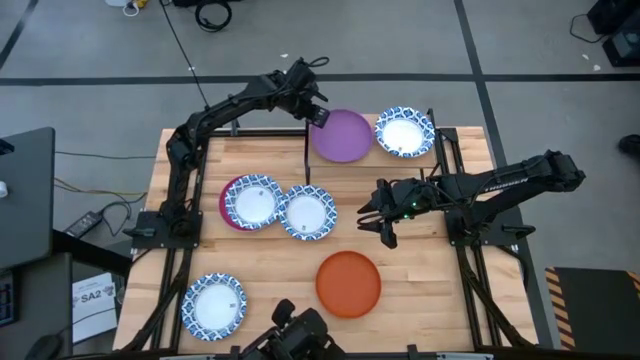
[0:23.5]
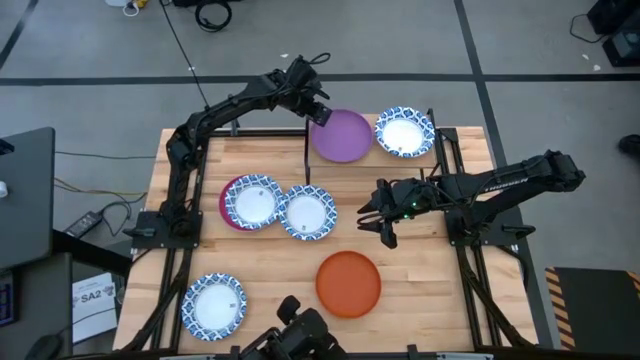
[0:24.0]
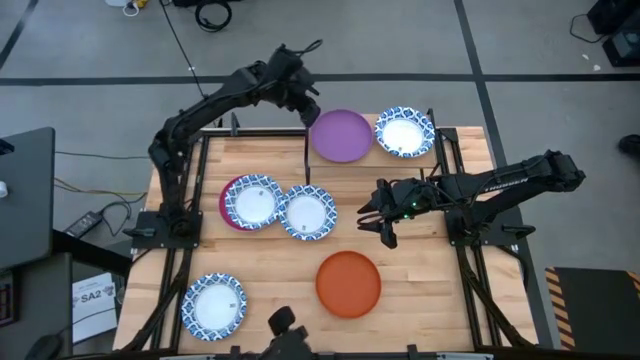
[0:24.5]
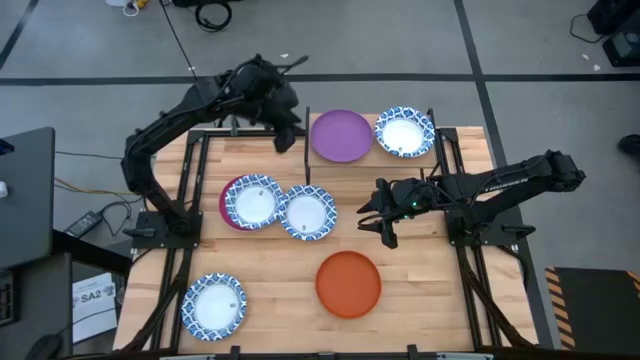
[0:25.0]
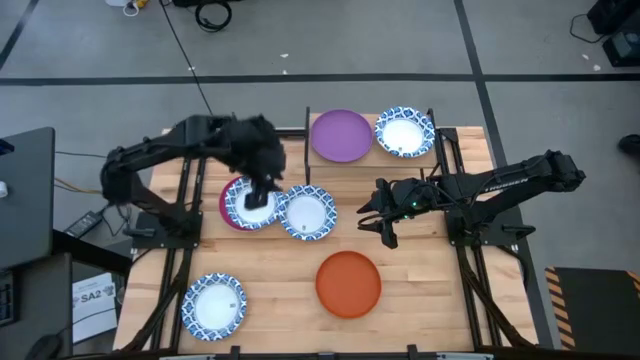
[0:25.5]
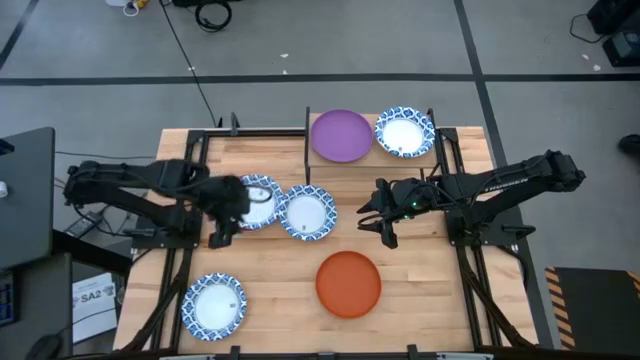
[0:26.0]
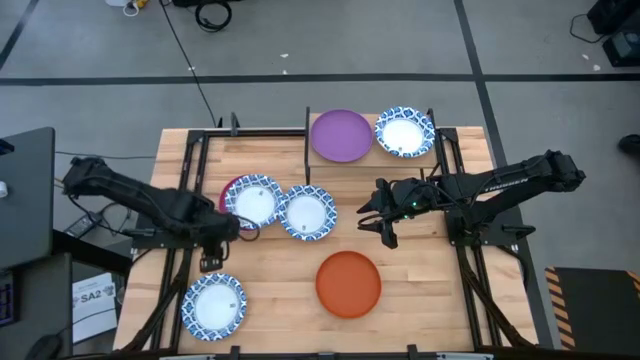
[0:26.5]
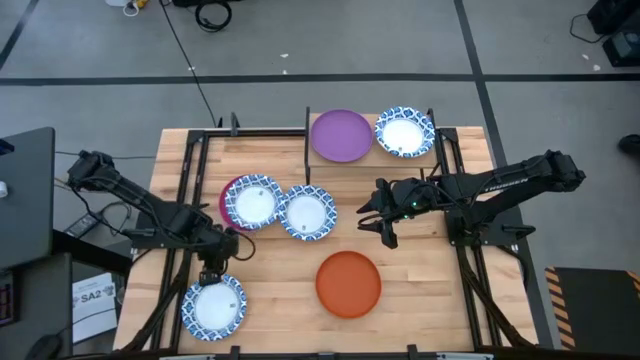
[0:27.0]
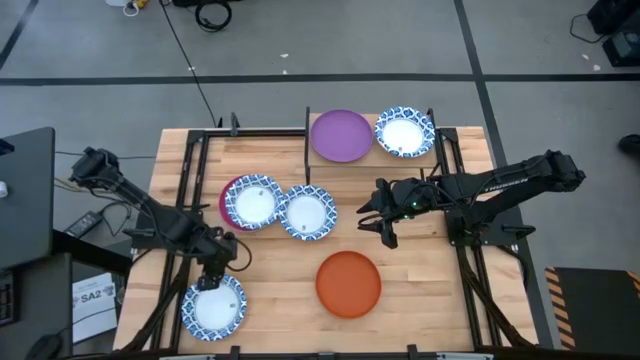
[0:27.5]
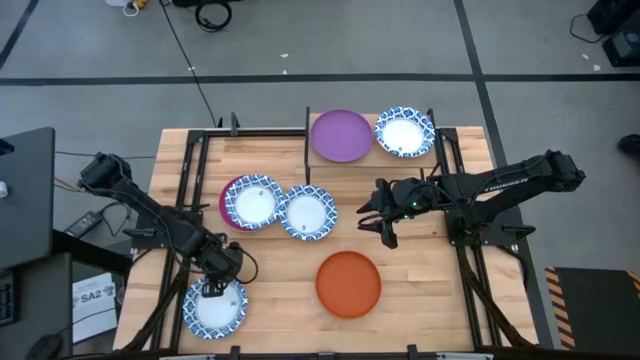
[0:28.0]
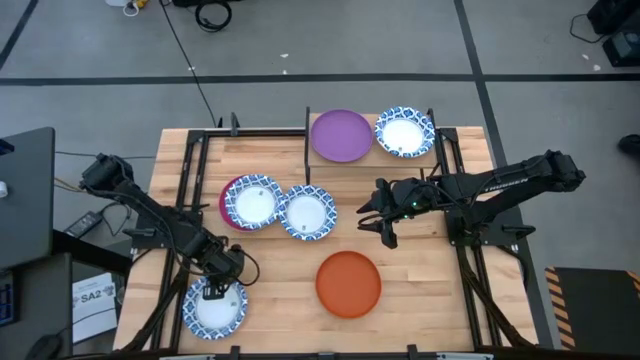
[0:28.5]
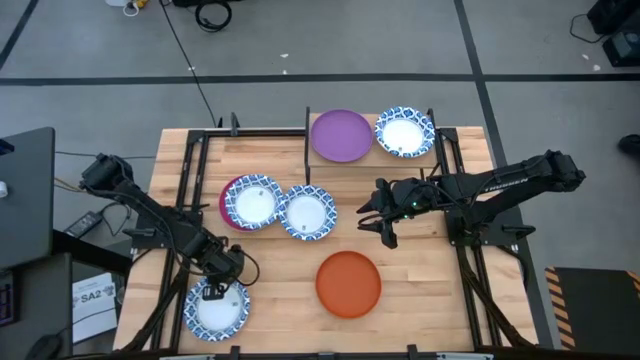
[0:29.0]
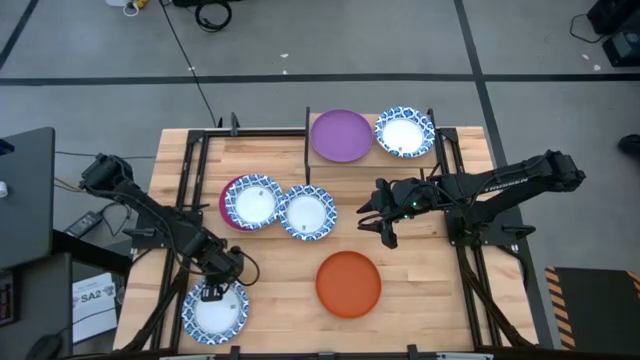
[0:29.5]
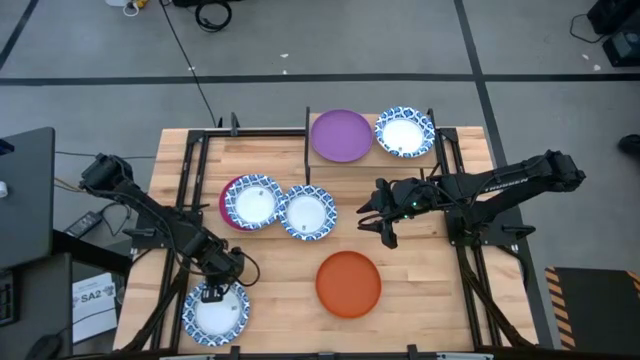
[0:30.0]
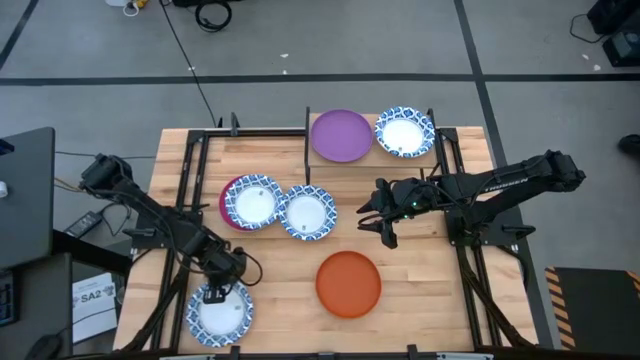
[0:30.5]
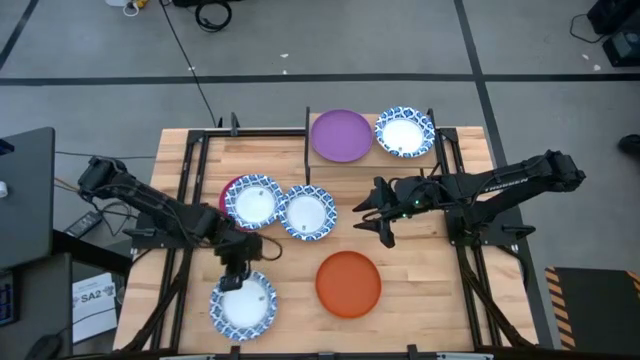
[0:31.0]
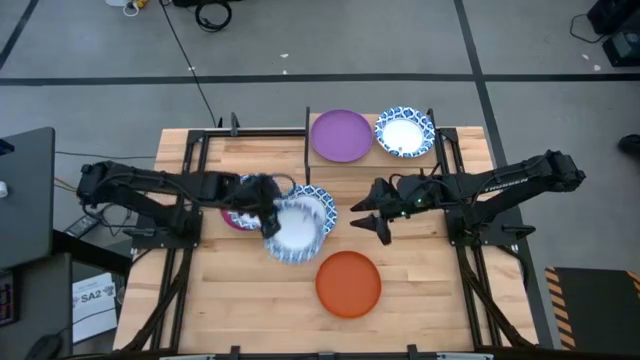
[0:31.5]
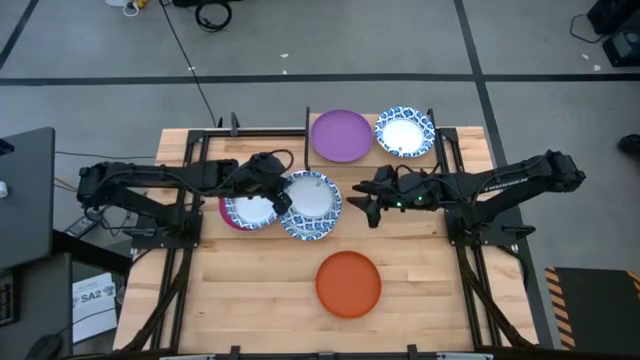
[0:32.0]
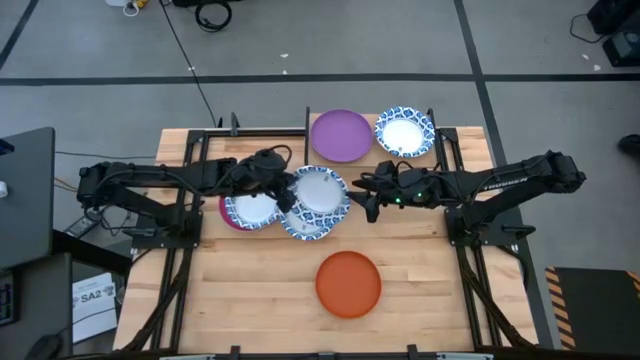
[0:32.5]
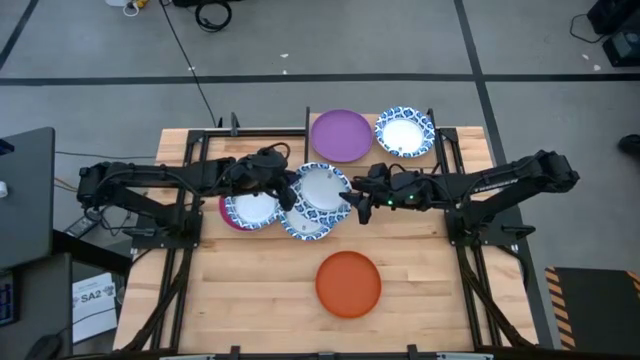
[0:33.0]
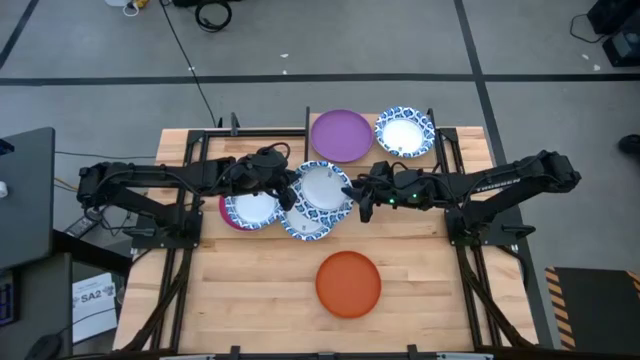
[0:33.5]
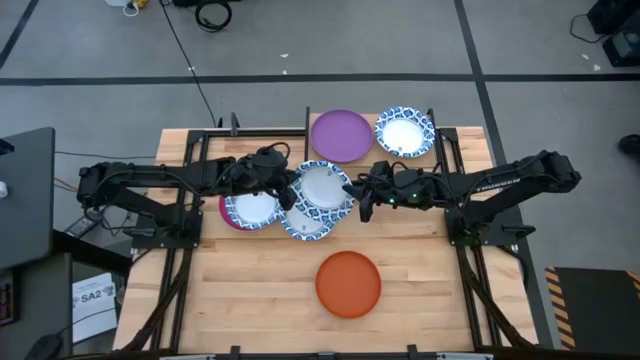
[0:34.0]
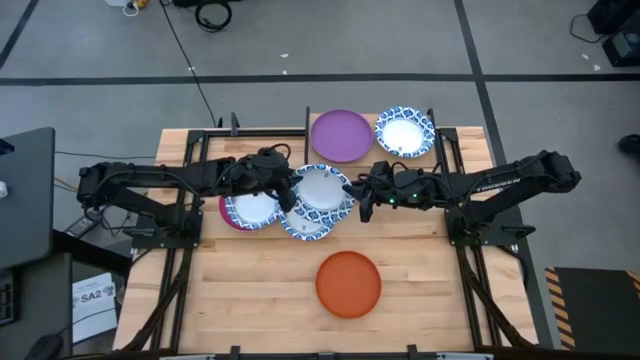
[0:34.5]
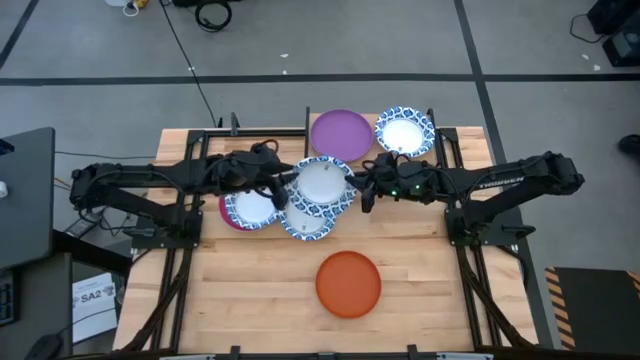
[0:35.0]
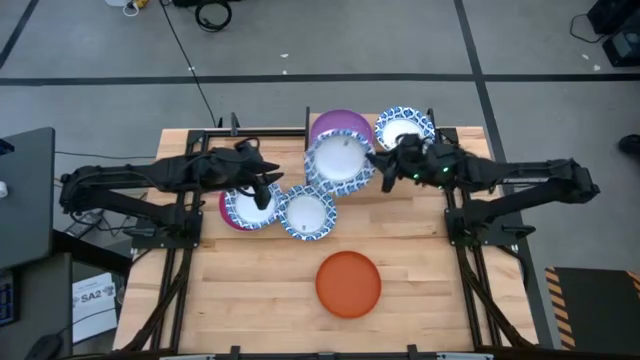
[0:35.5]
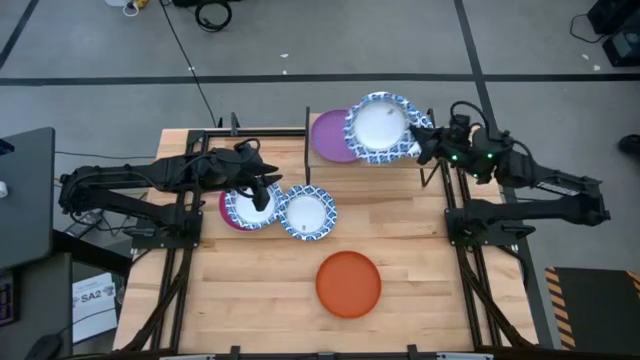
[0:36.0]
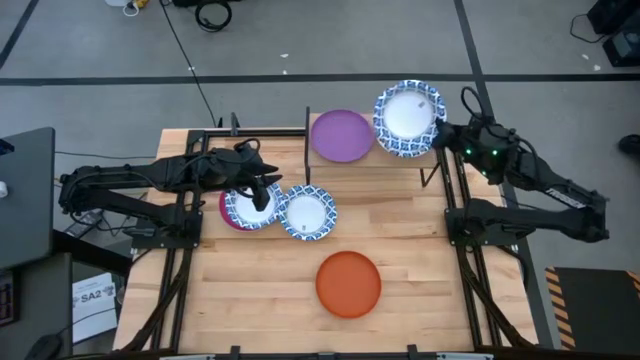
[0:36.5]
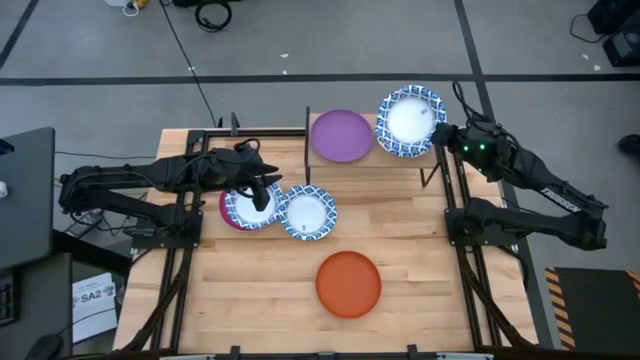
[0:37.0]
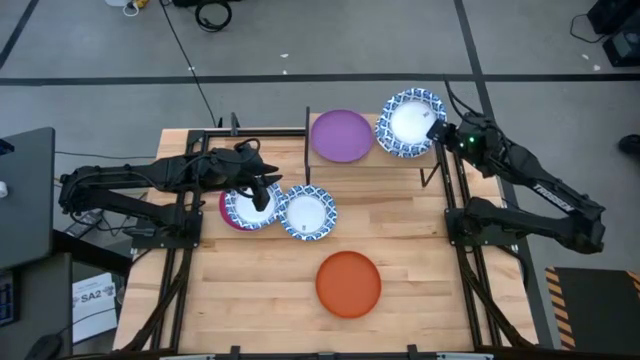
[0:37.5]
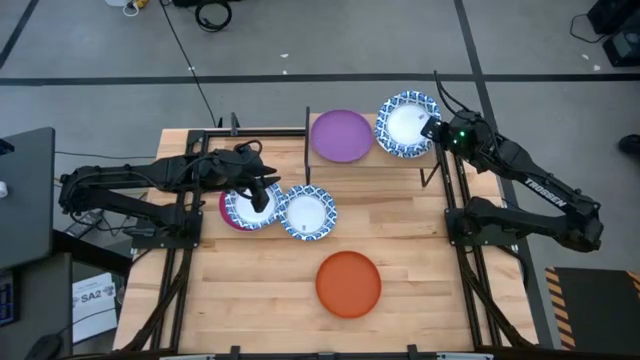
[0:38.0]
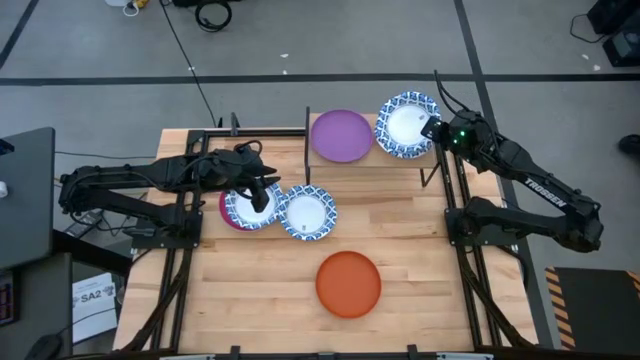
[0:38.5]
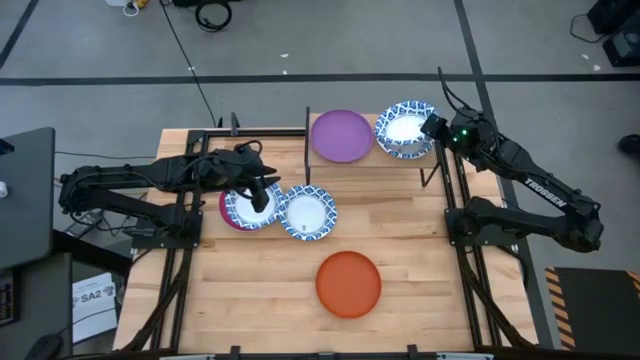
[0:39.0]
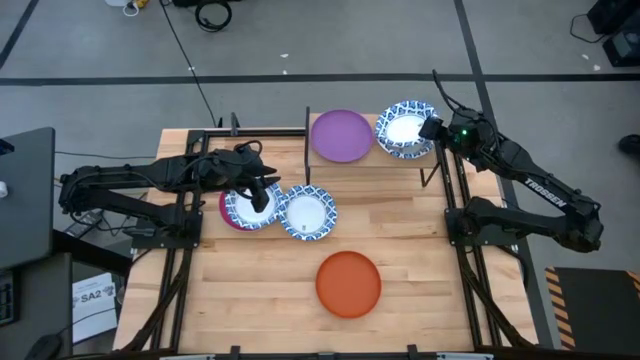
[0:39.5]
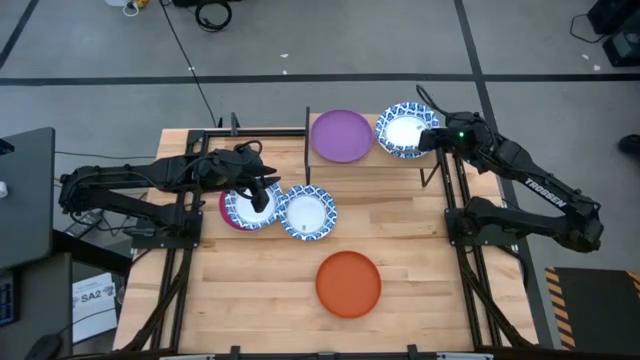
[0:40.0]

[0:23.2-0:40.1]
Task: Place and stack plates onto a shelf
Stack the white patterned bowl on top of the white patterned bowl on the shelf

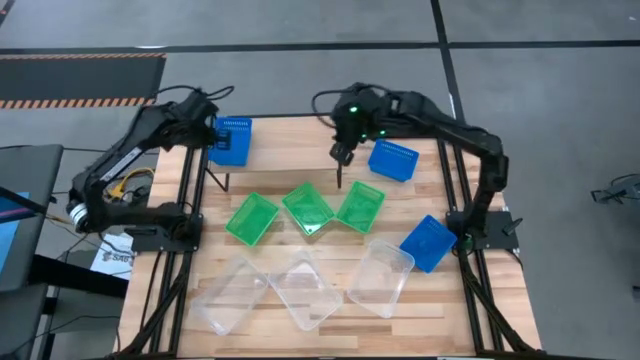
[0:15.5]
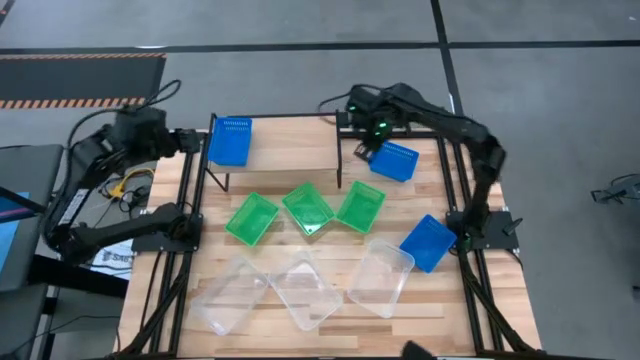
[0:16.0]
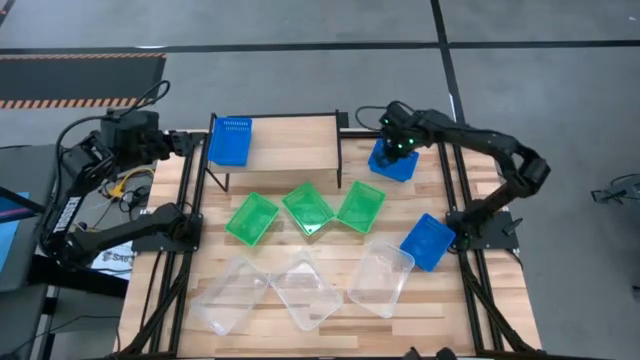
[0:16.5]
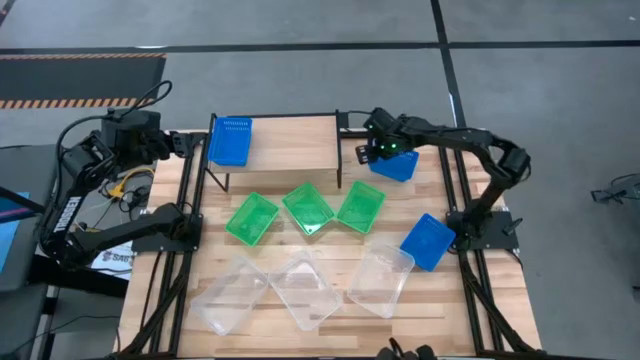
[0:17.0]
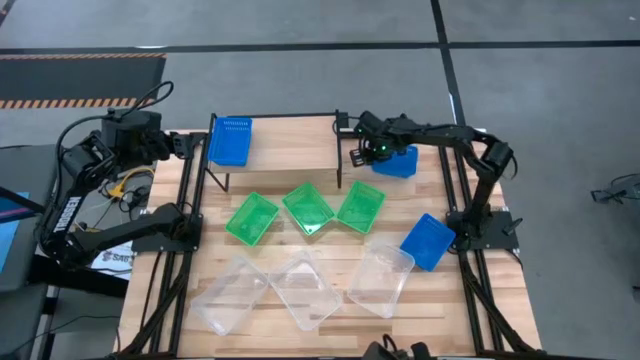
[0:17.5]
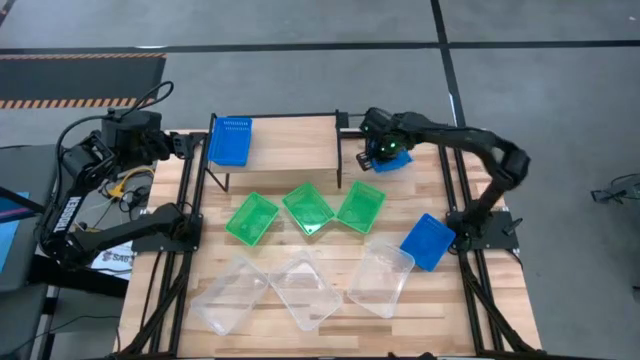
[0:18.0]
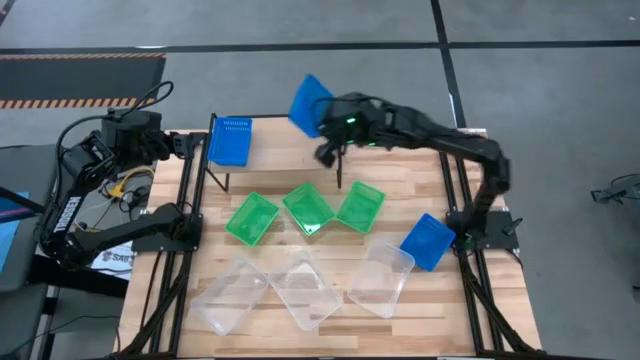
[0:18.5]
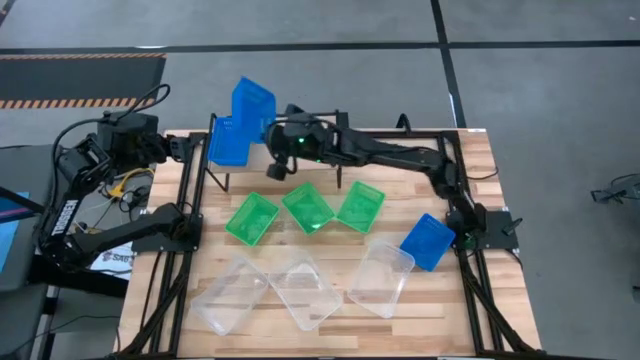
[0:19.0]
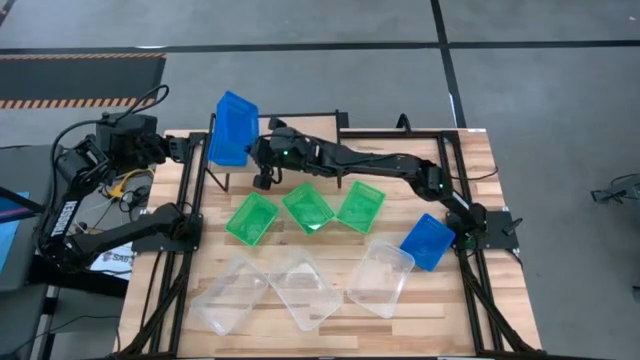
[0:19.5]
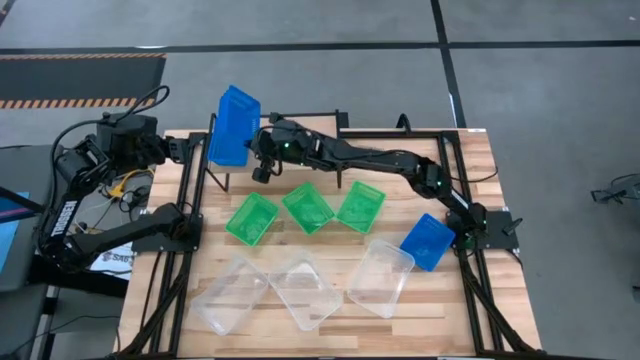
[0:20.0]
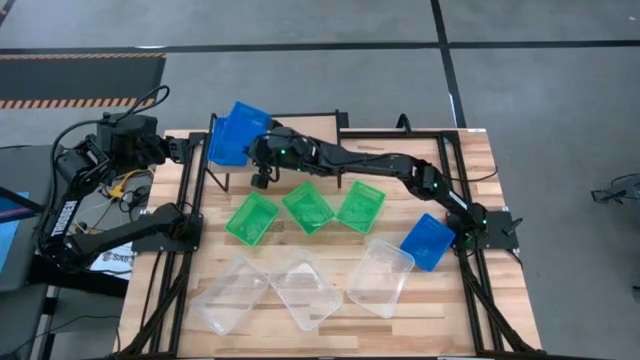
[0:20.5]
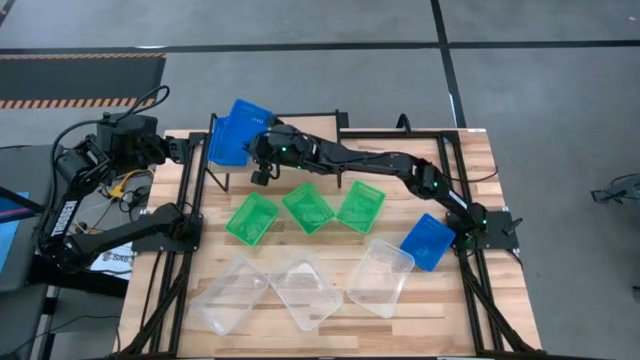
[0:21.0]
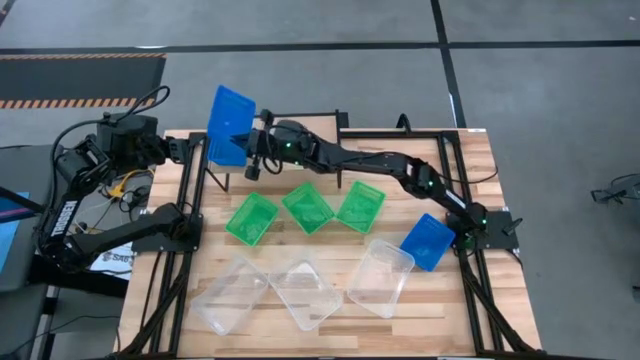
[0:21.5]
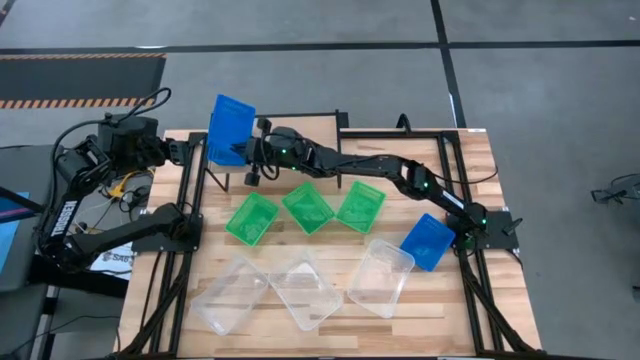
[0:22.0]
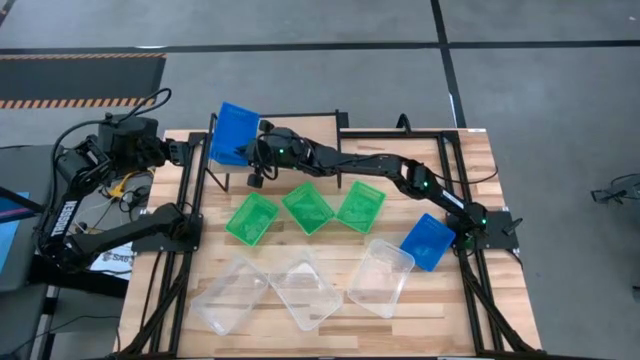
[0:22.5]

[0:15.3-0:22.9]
Task: Stack baskets on shelf by color
Stack the top blue bin on top of the other blue bin on the shelf
